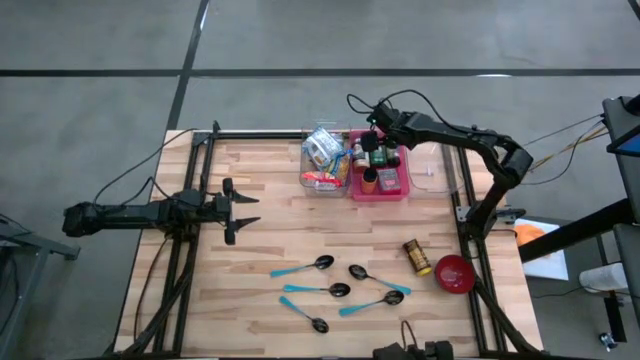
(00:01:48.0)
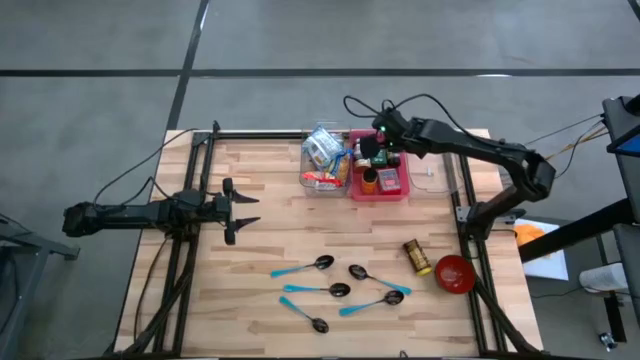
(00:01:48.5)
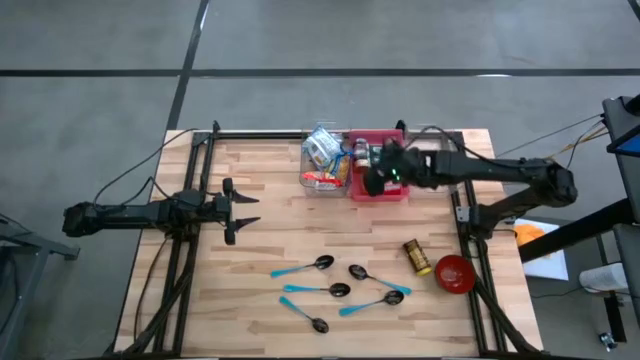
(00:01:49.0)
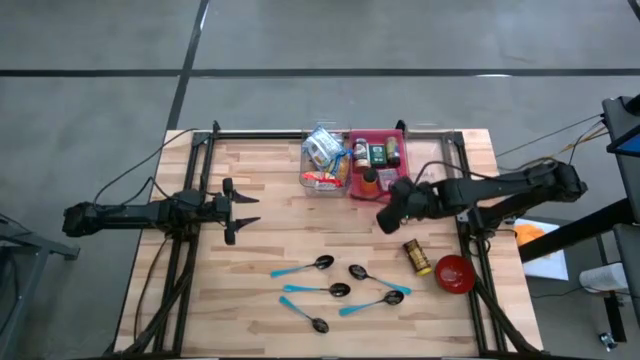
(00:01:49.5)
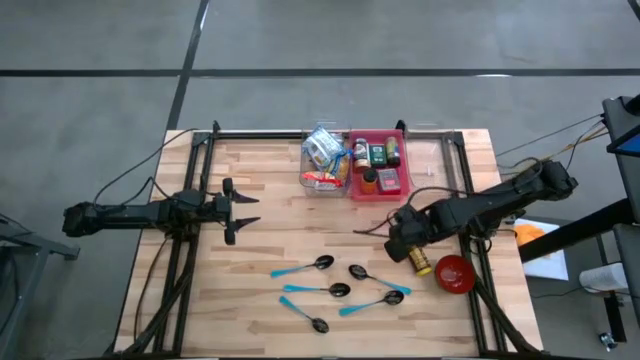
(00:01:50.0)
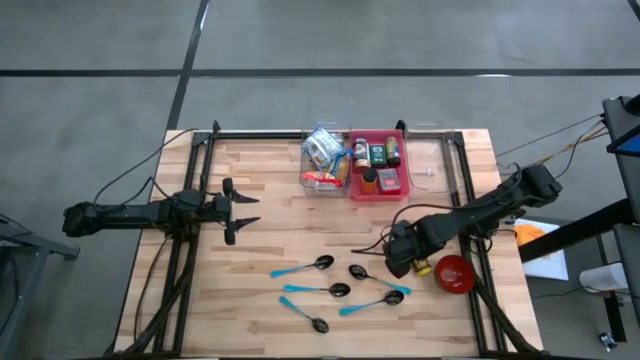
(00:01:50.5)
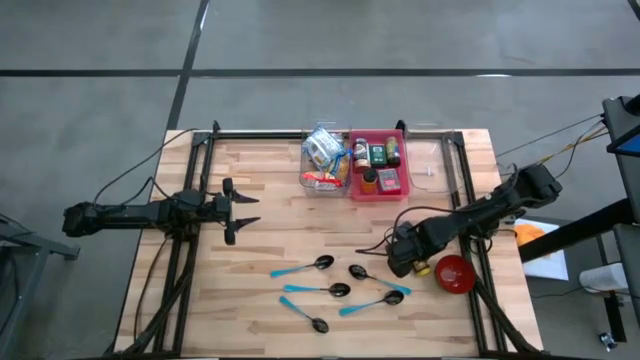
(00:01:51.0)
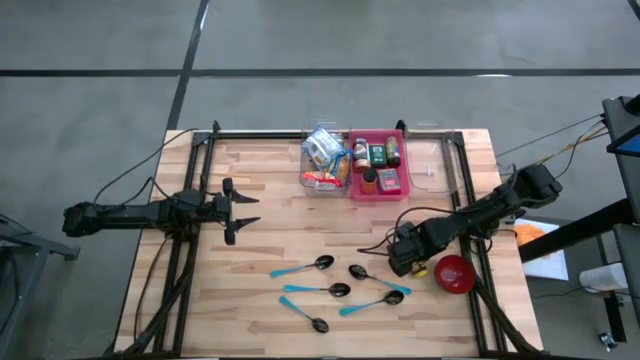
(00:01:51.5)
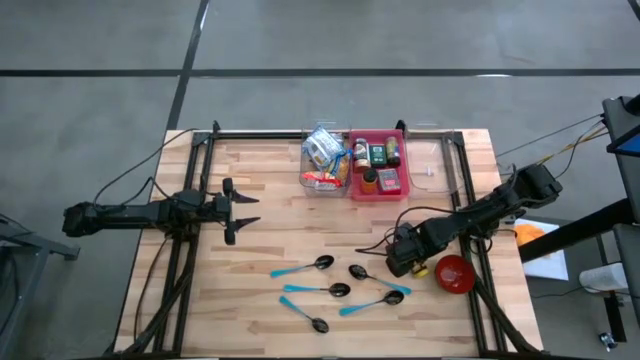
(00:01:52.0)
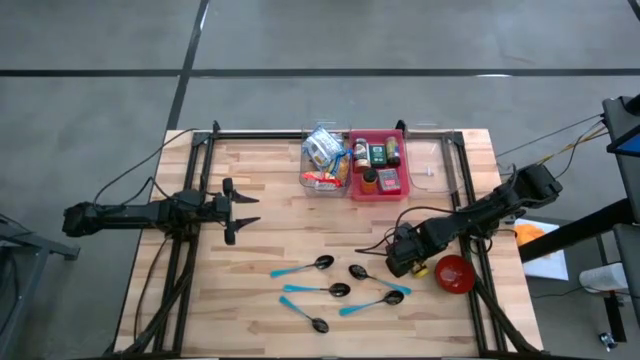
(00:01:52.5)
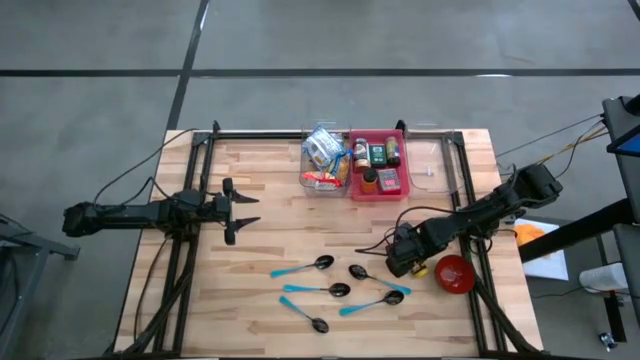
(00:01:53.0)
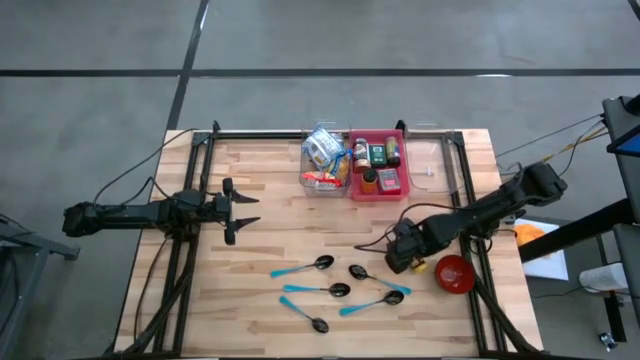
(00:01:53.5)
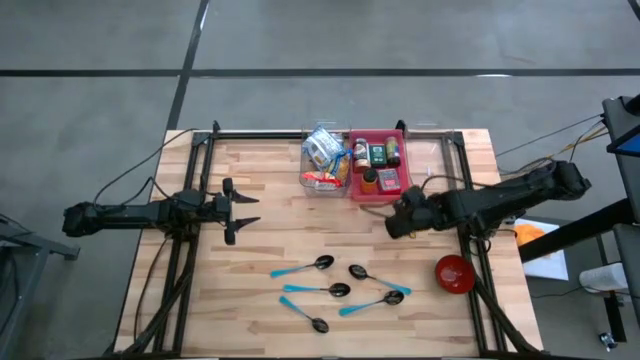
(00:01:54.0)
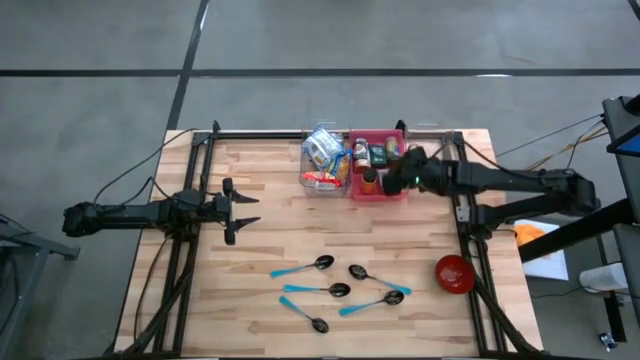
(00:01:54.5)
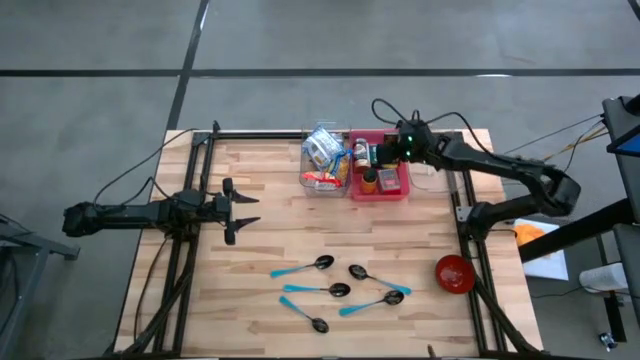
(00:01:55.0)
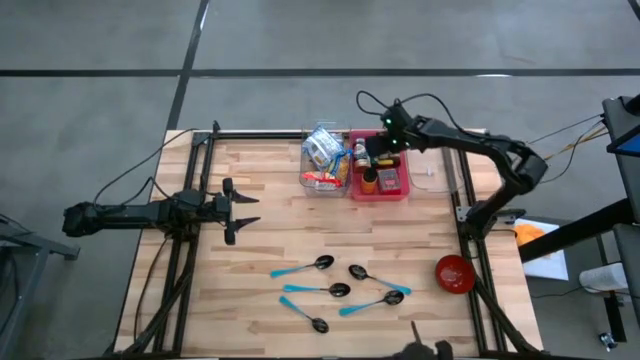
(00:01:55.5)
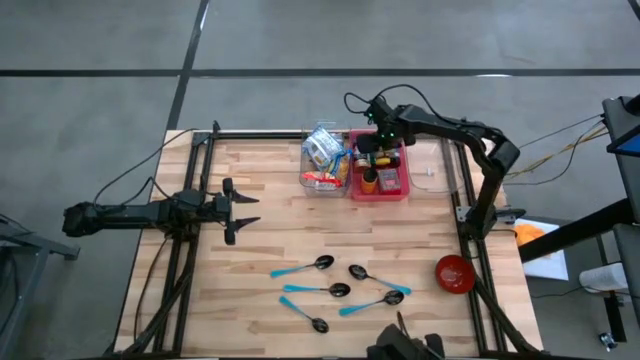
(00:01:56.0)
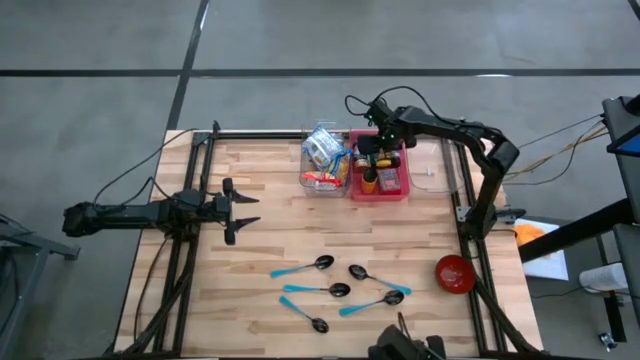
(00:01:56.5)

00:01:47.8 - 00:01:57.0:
Put the yellow spice bottle into the pink bin

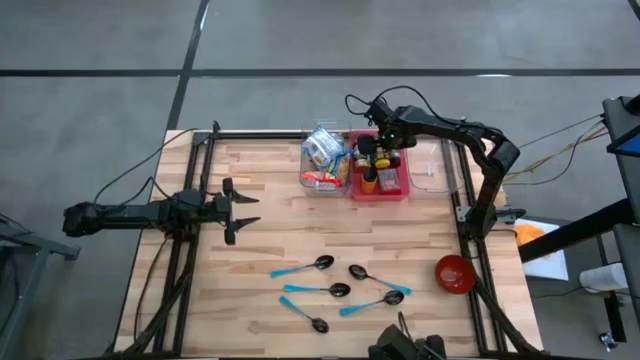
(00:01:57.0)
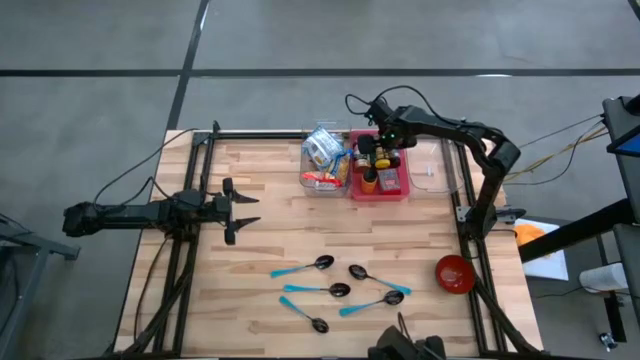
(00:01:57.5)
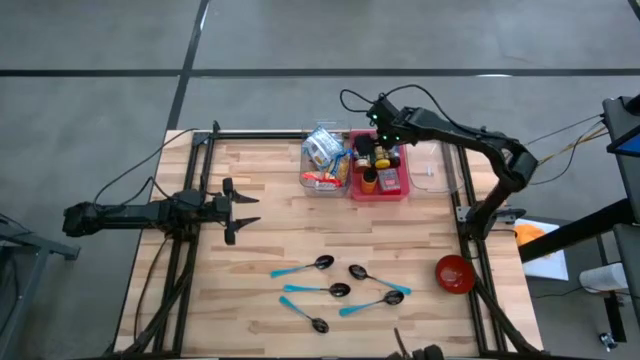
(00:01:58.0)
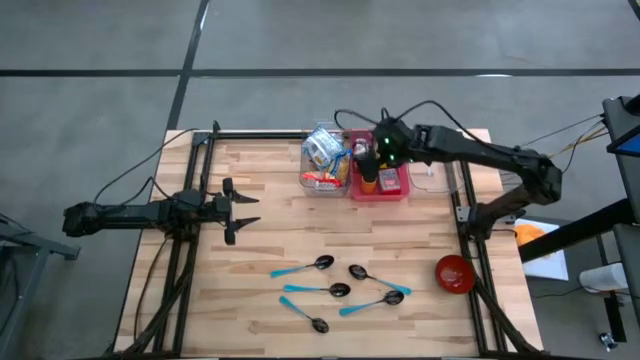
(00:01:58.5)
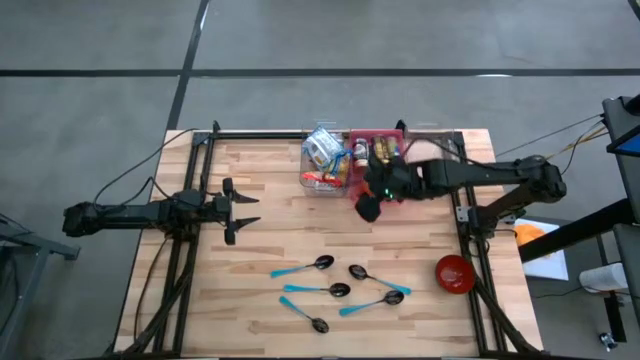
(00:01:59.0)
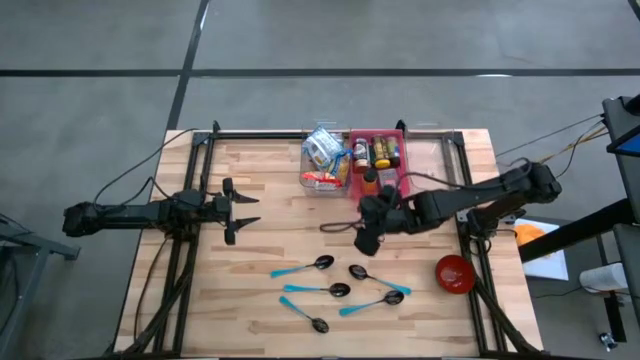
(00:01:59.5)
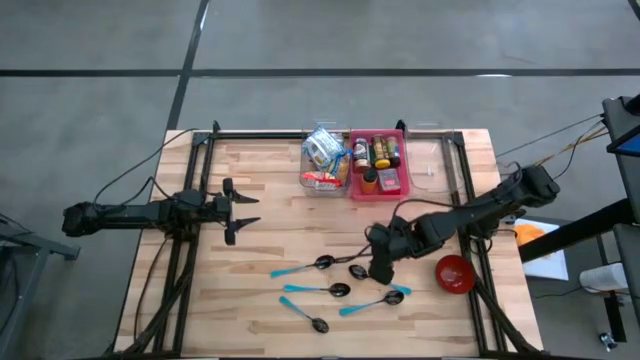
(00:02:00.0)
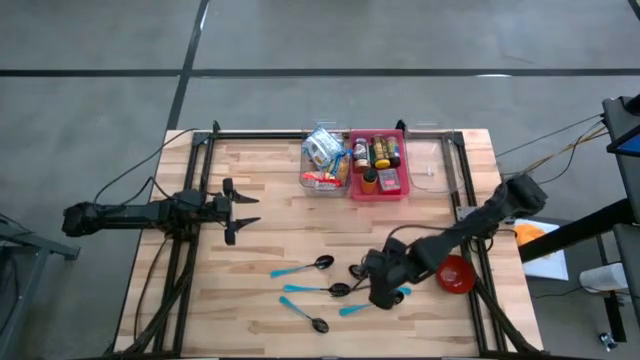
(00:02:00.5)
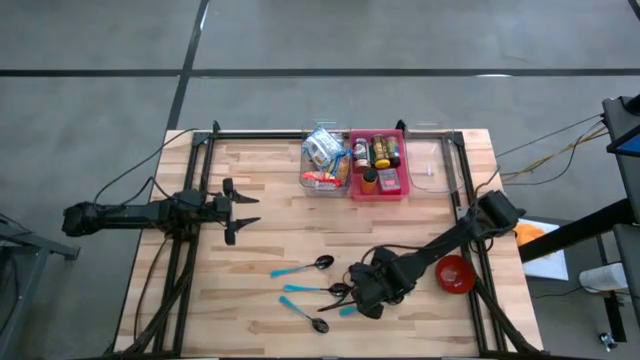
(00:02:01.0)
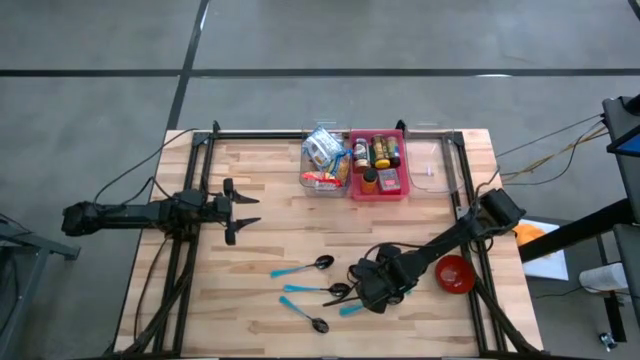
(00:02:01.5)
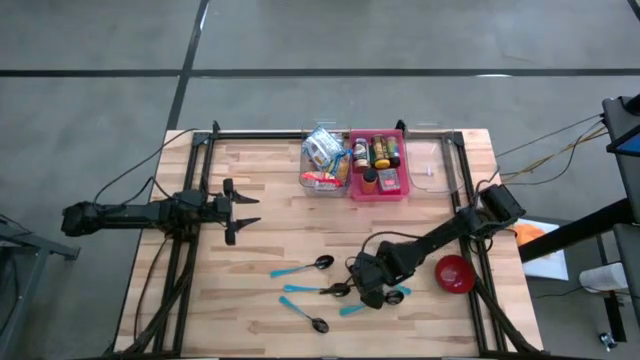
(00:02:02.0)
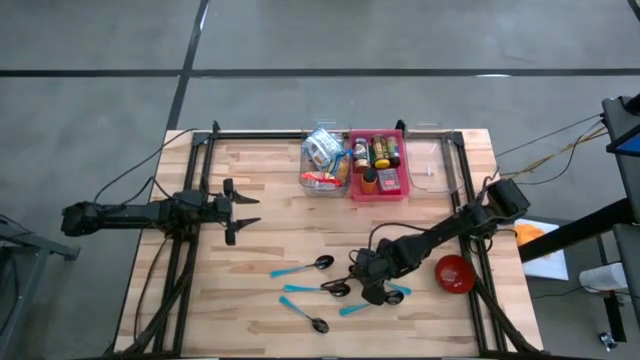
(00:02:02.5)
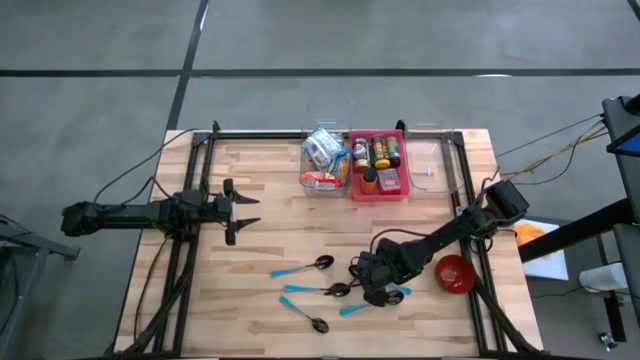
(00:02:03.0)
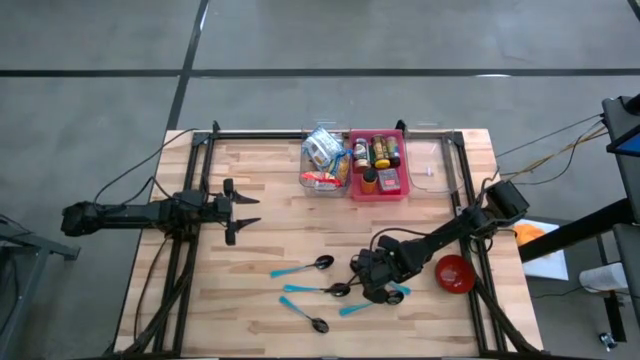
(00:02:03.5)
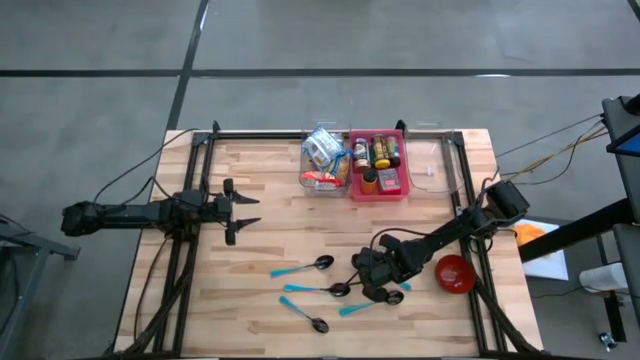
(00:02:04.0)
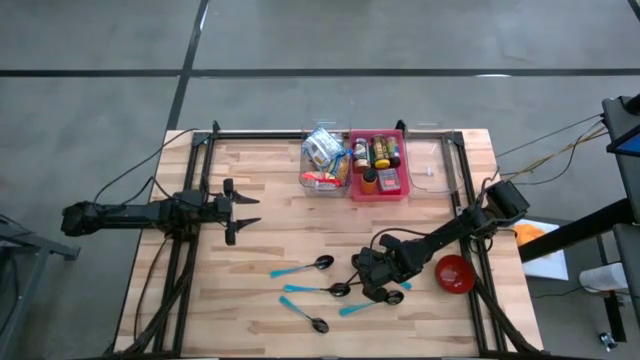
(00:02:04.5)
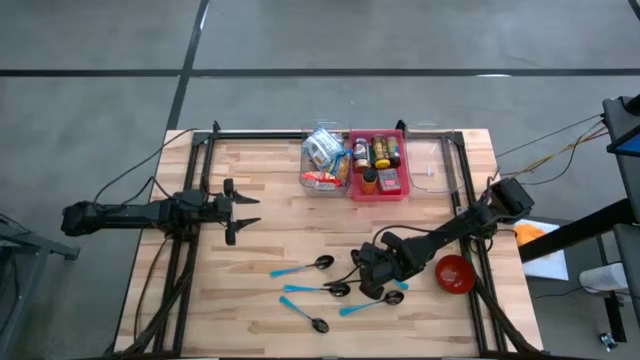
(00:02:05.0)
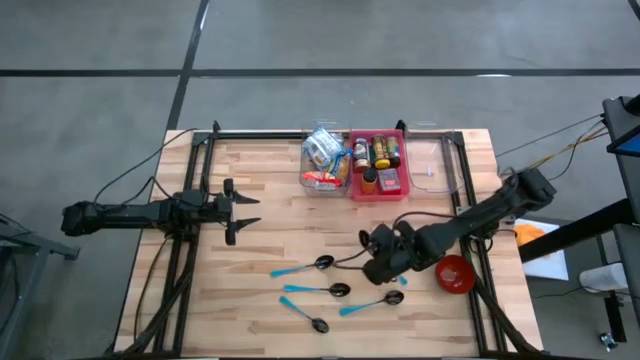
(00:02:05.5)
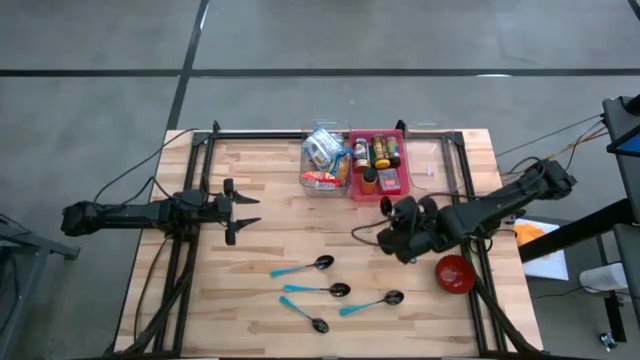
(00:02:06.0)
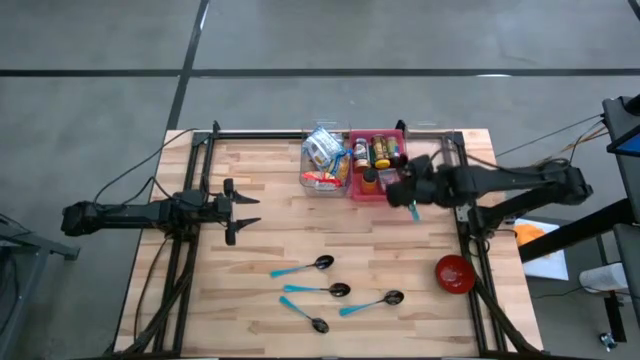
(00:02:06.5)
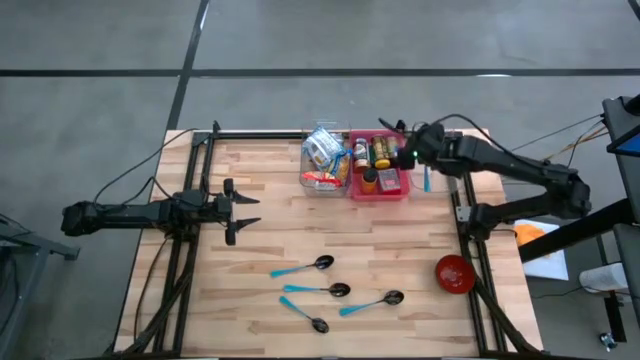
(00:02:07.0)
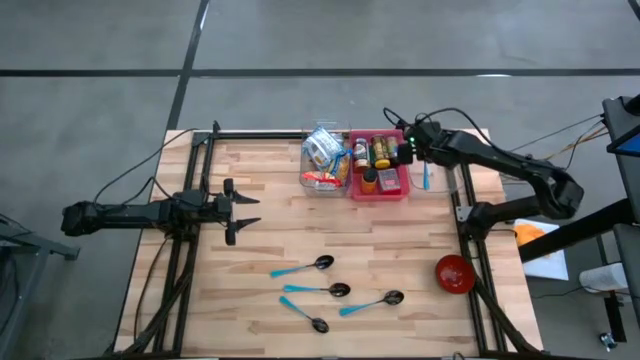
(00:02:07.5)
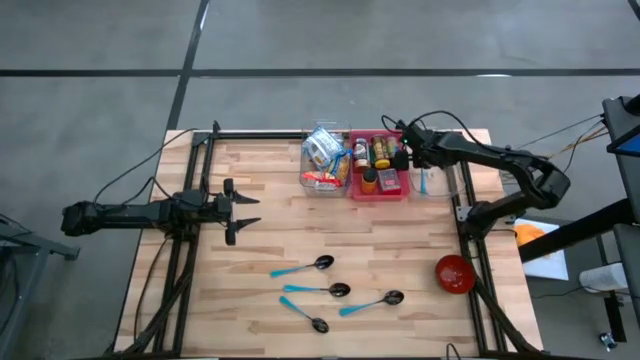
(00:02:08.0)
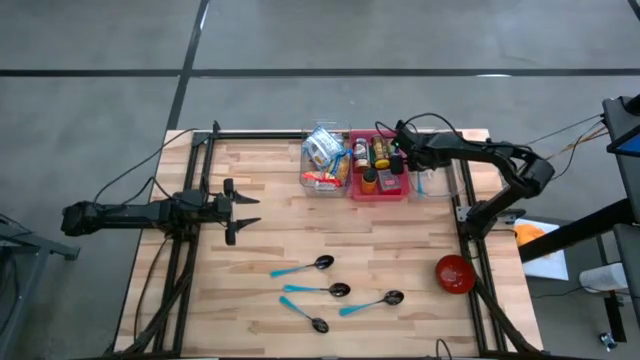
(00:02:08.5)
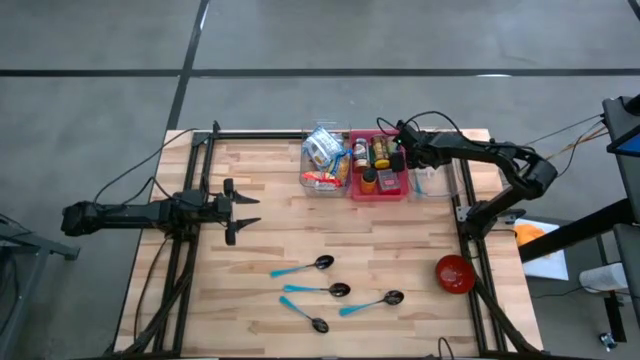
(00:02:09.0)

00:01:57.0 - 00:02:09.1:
Put the blue spoon into the right transparent bin
